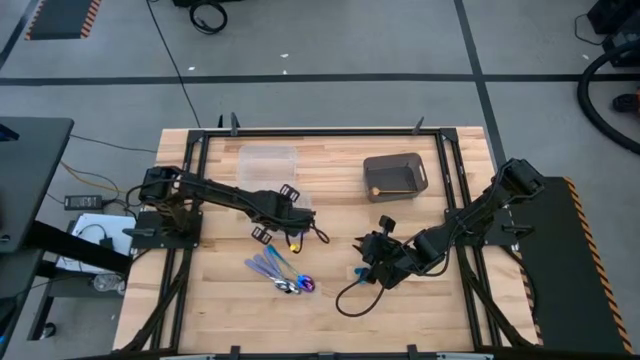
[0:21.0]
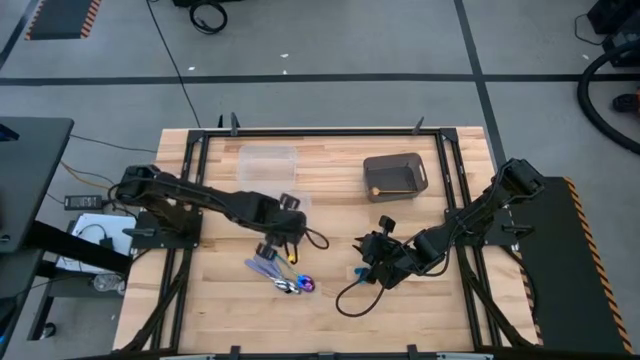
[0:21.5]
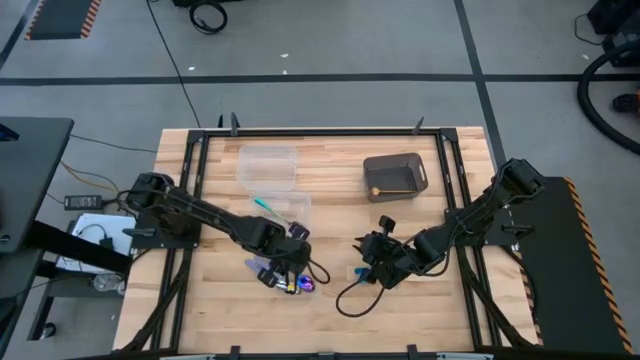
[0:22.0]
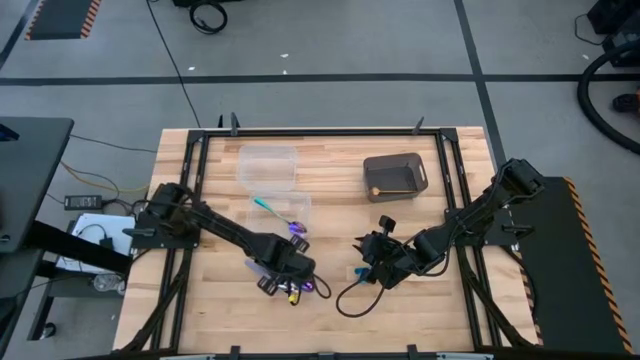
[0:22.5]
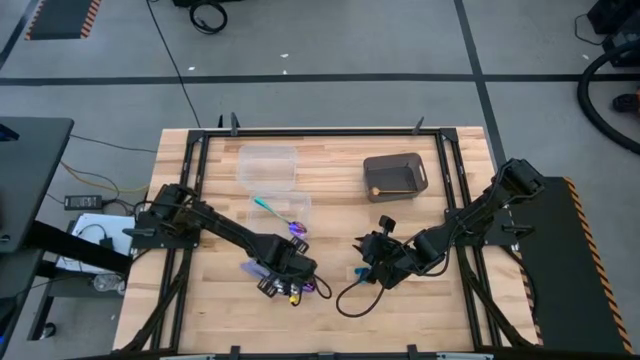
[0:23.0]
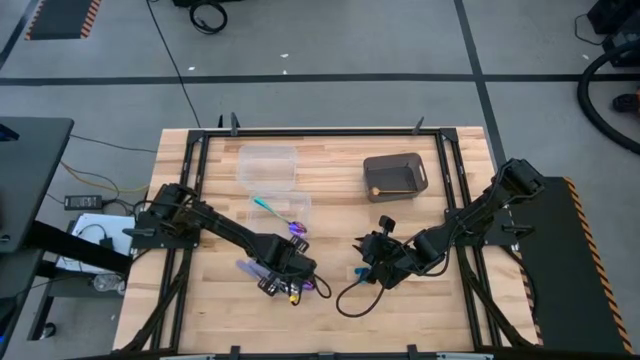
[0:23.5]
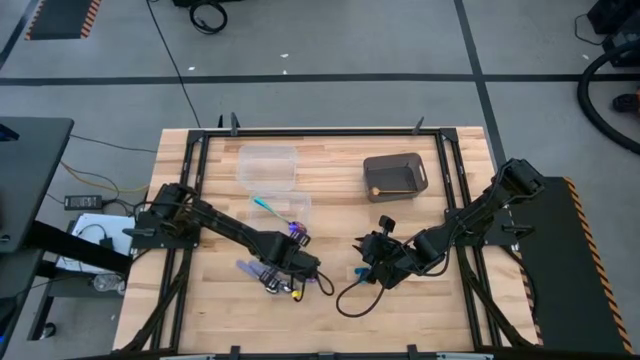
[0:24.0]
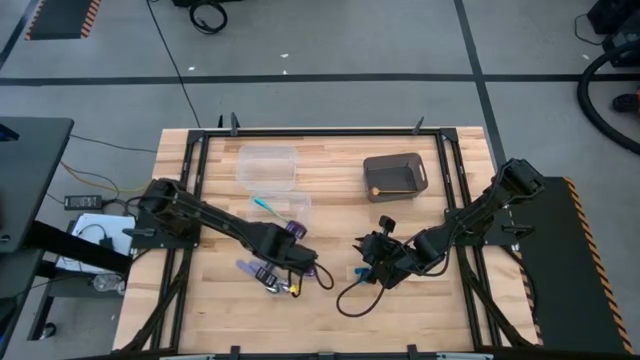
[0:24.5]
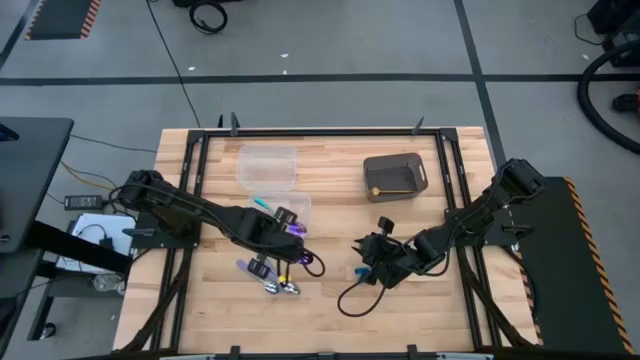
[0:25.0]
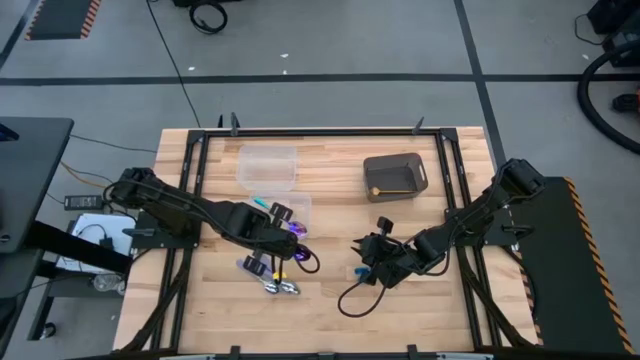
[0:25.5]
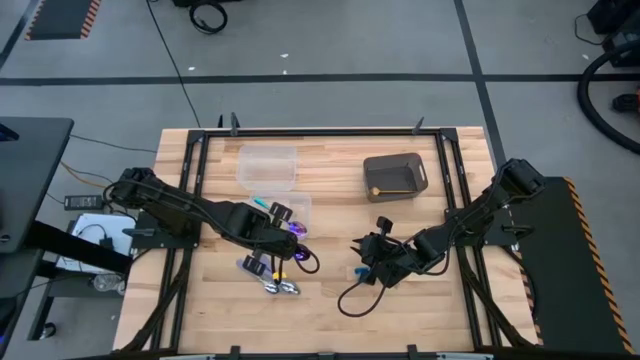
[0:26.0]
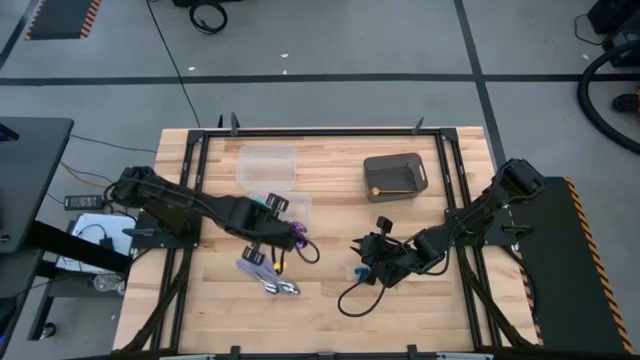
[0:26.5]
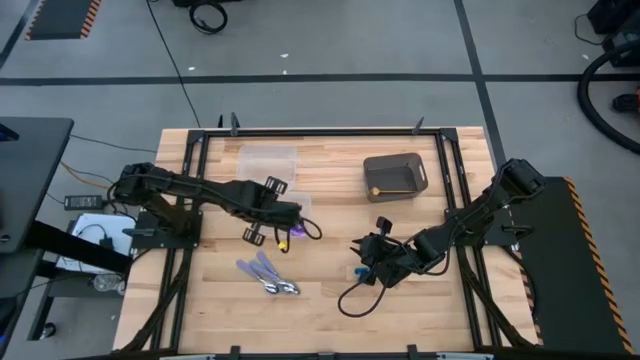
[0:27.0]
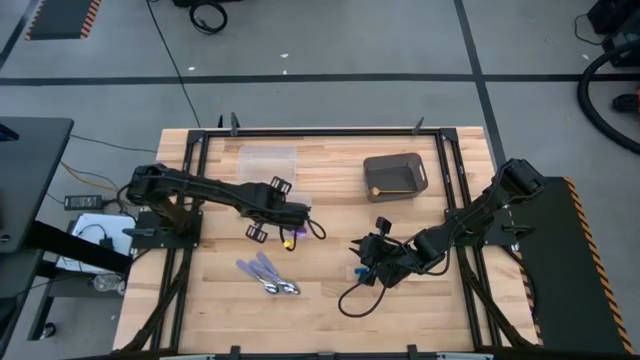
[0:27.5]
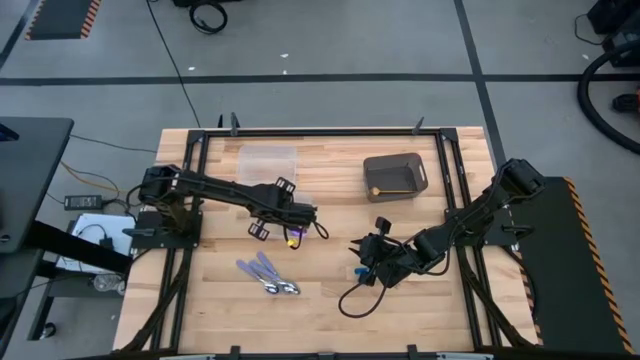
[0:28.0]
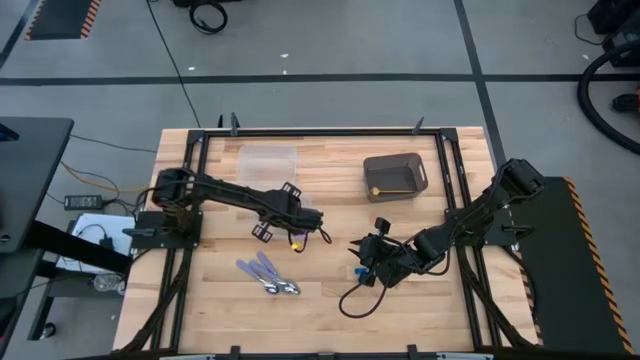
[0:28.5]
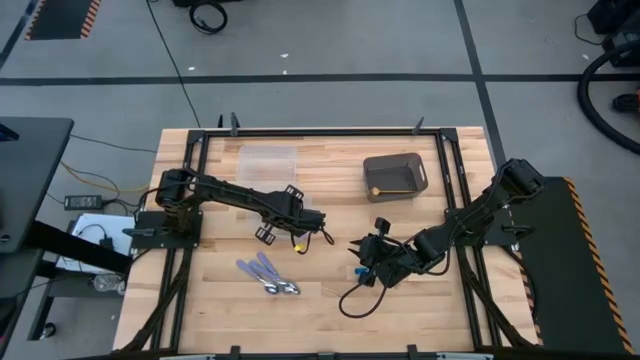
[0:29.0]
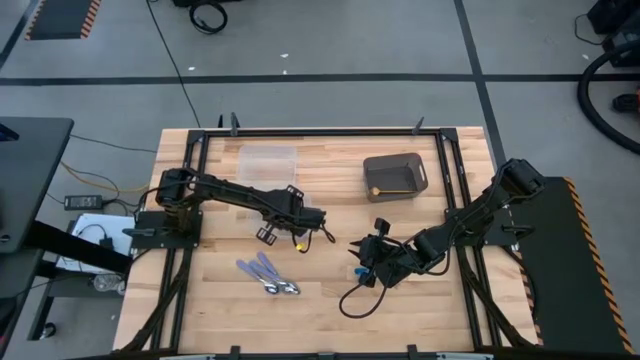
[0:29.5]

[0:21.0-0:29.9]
Task: Sort silverware by color (type)
Put the blue spoon into the bottom transparent bin

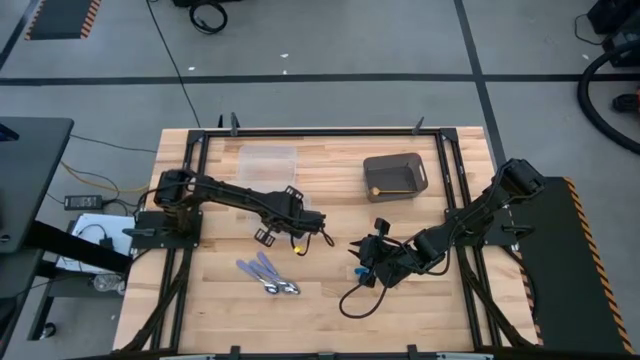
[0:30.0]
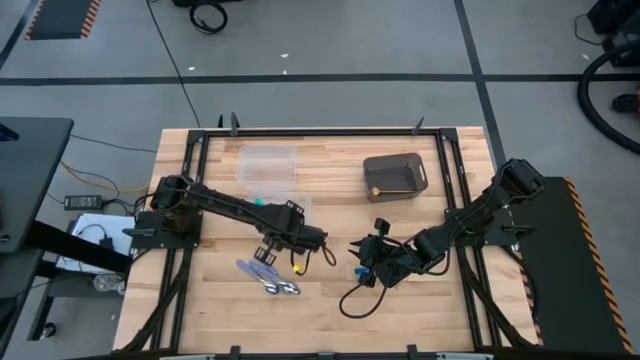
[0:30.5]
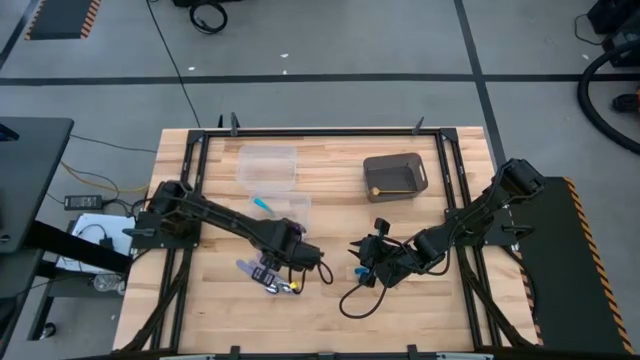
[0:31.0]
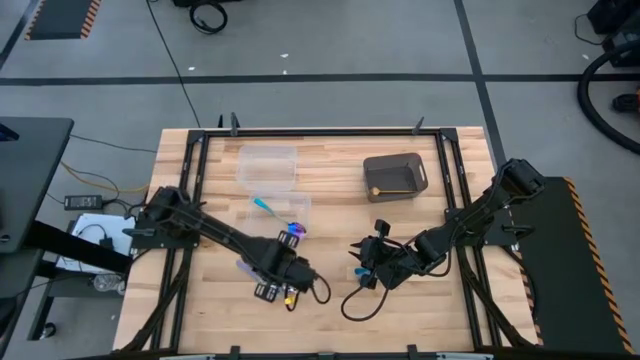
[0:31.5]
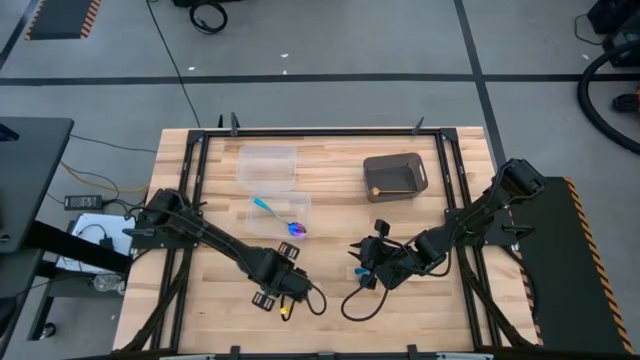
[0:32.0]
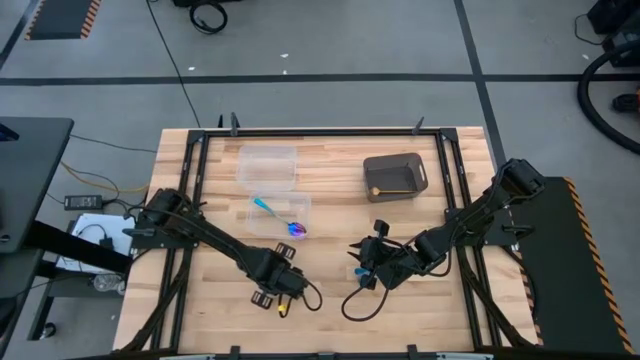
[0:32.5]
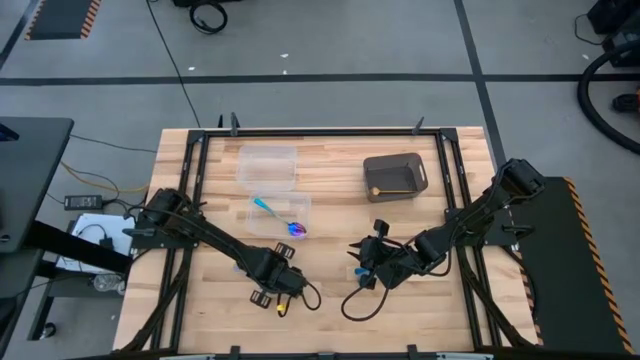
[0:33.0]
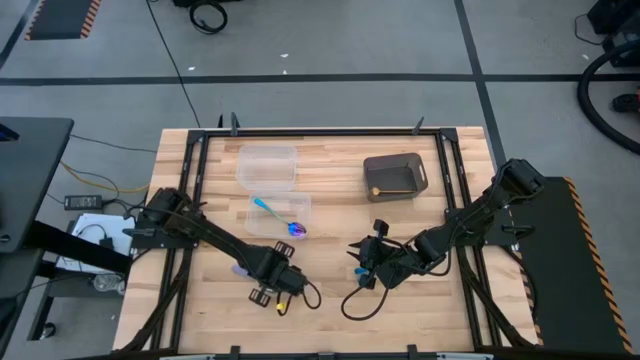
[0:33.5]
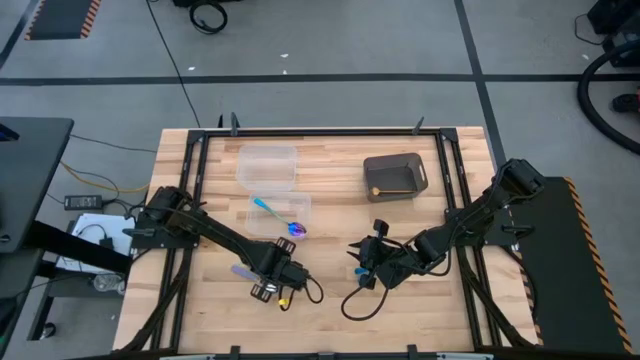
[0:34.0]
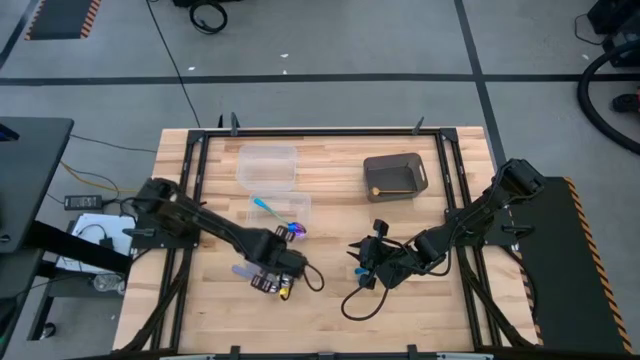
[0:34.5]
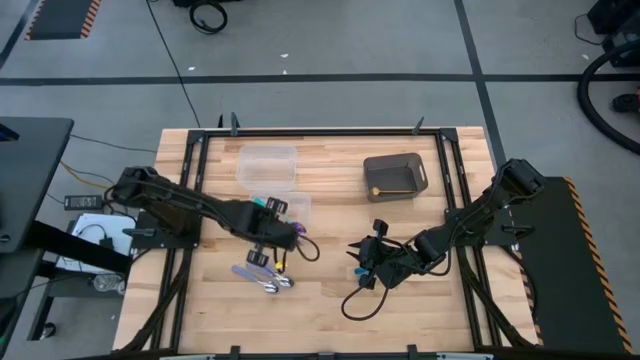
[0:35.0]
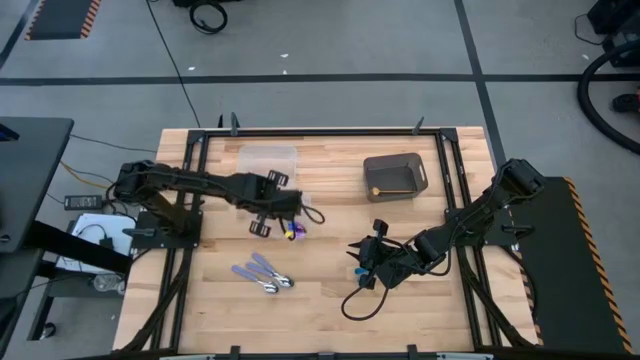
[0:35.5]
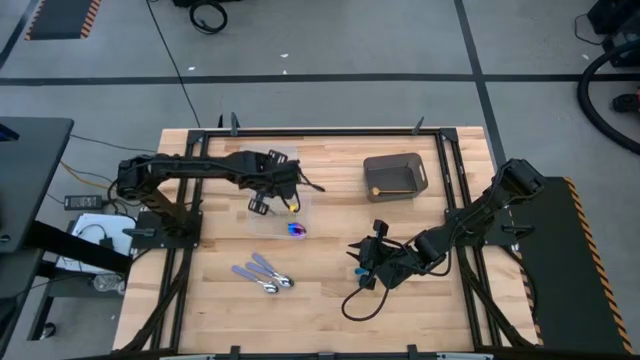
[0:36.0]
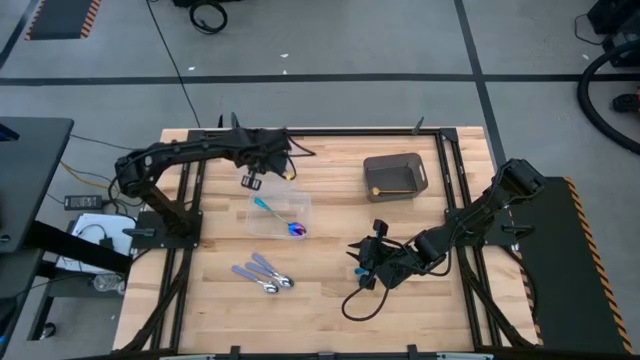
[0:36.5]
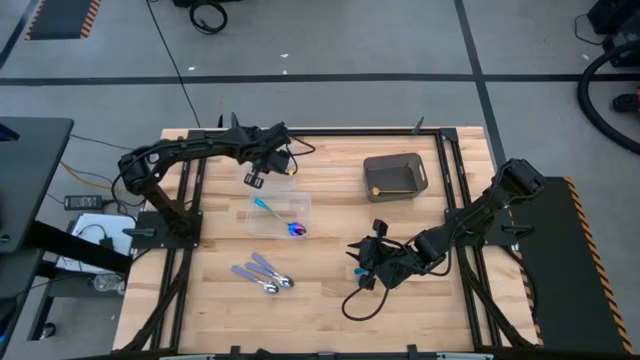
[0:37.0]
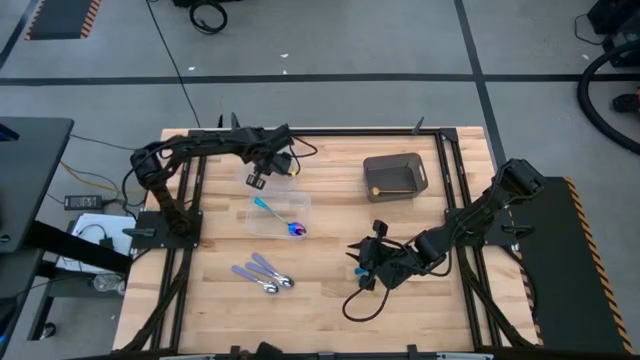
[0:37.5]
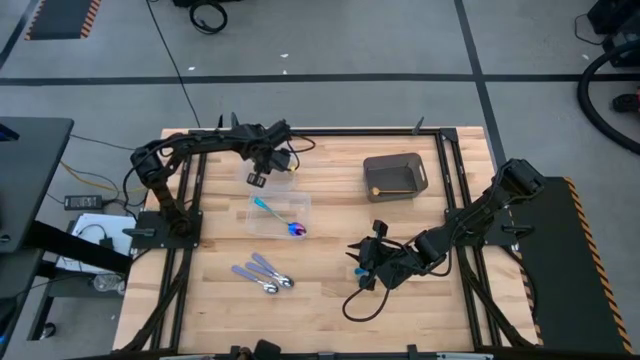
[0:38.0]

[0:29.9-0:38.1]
Put the purple spoon into the top transparent bin

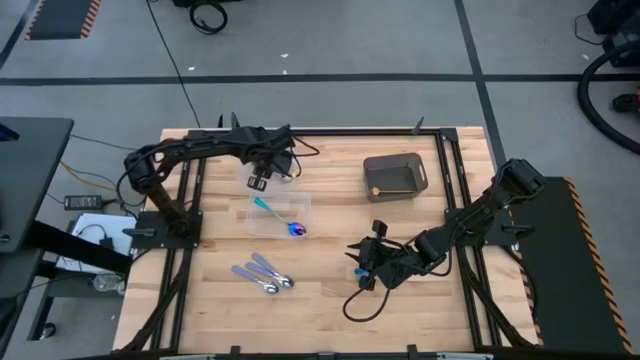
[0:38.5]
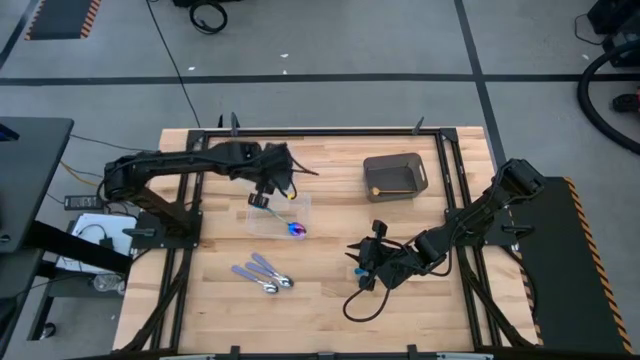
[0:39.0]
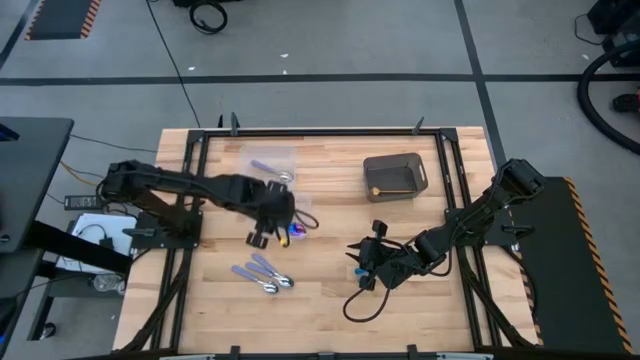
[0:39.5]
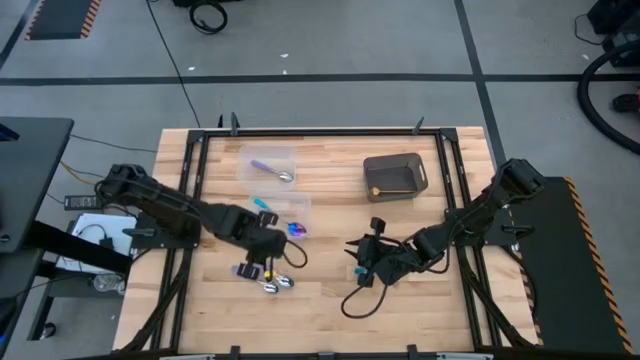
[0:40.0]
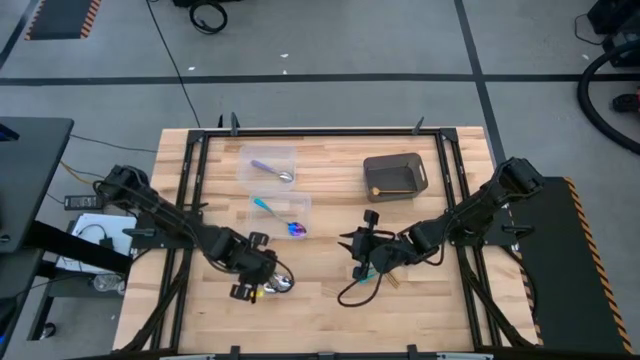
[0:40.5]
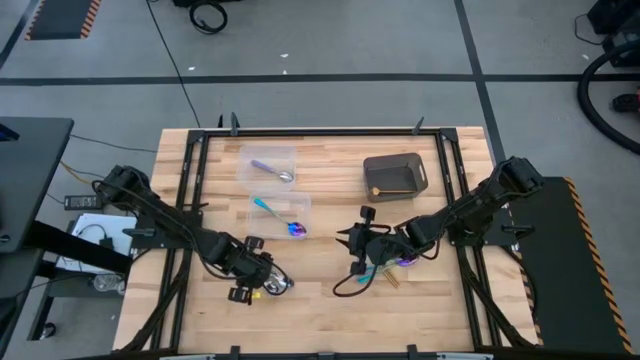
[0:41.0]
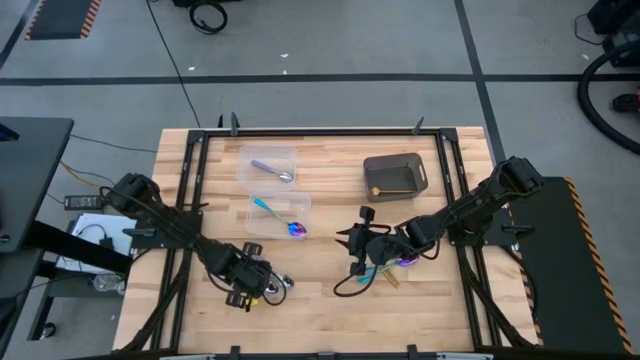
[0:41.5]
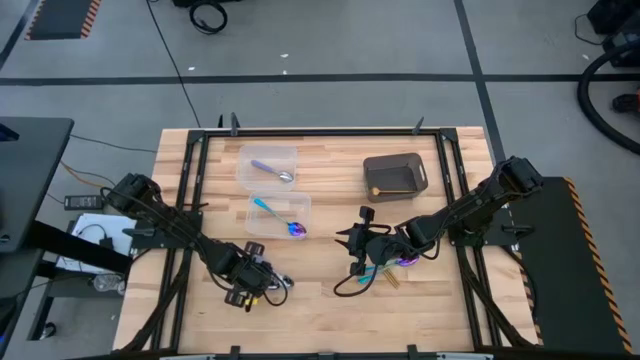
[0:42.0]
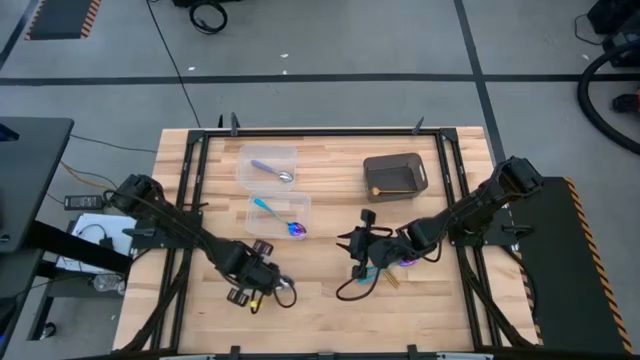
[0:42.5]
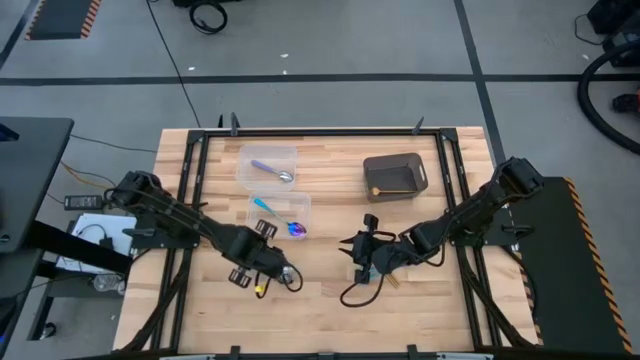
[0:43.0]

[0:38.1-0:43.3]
Put the purple spoon into the top transparent bin

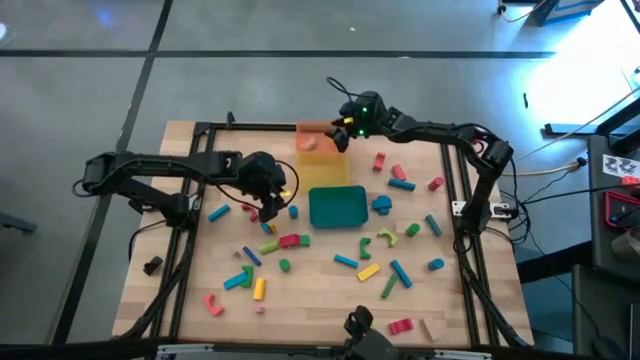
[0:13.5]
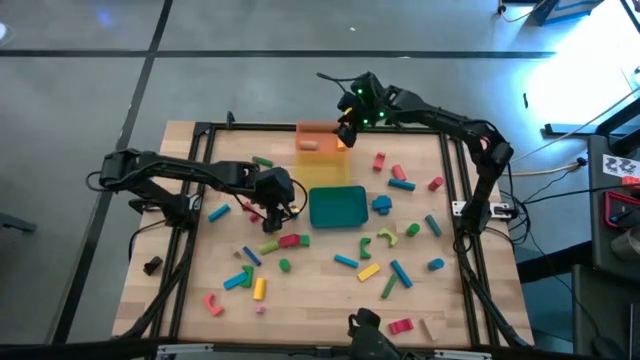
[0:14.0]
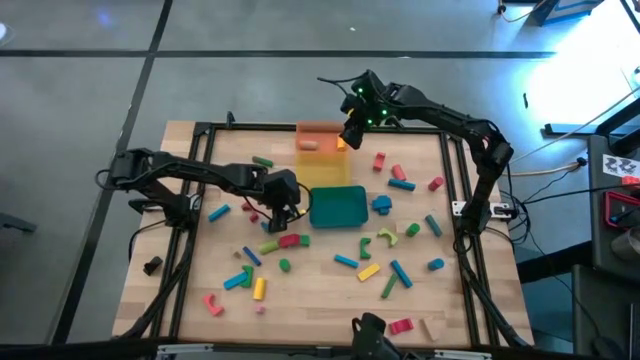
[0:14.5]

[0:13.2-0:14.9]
Task: Sort blocks by size
Put the blue cylinder block into the orange bin
